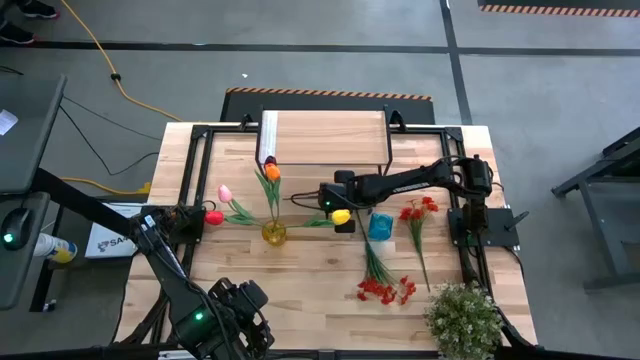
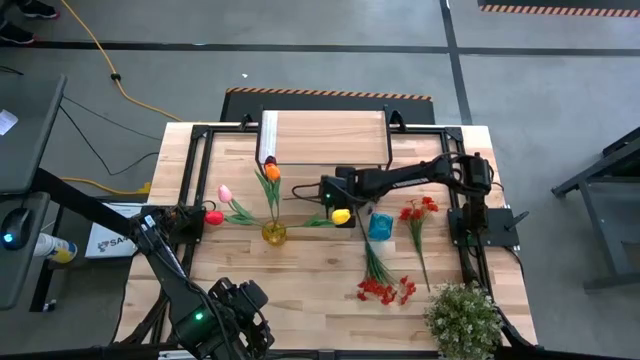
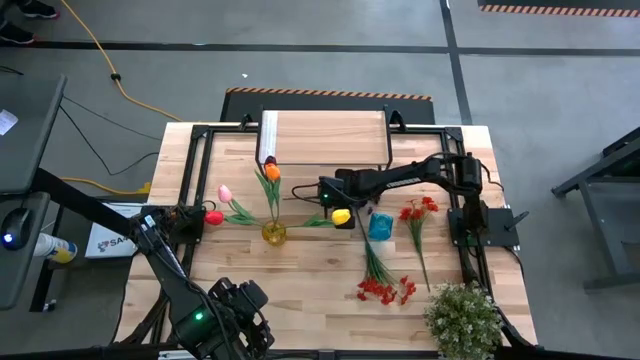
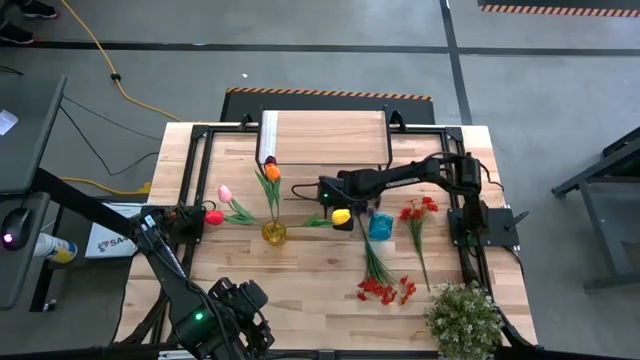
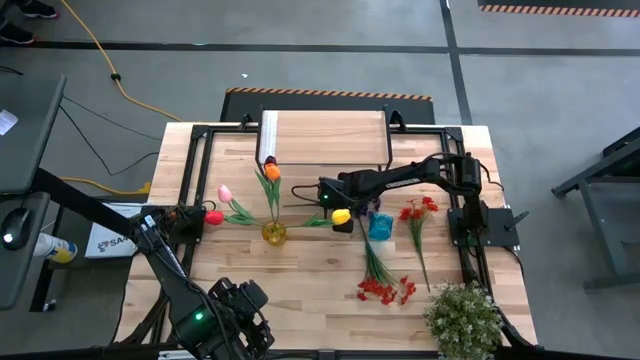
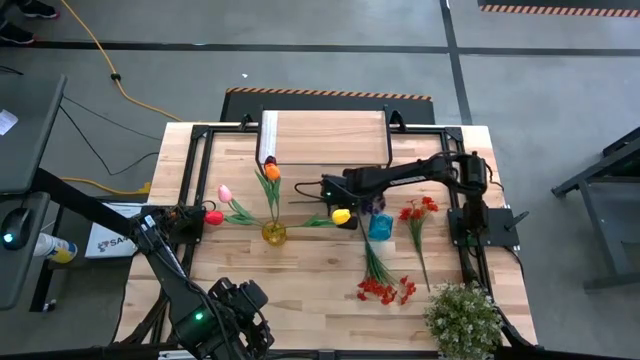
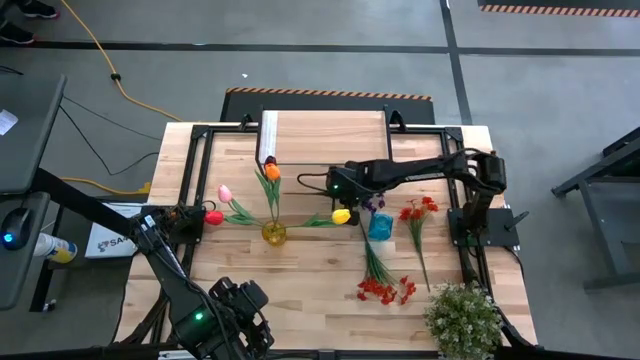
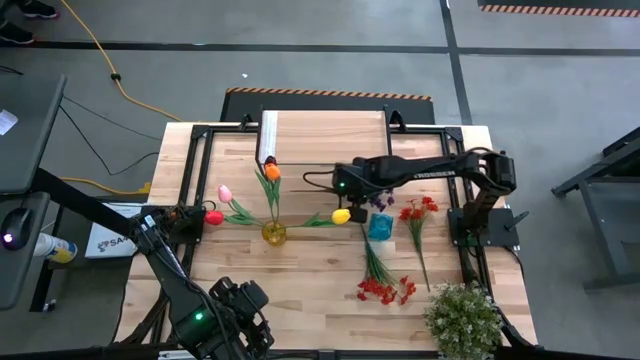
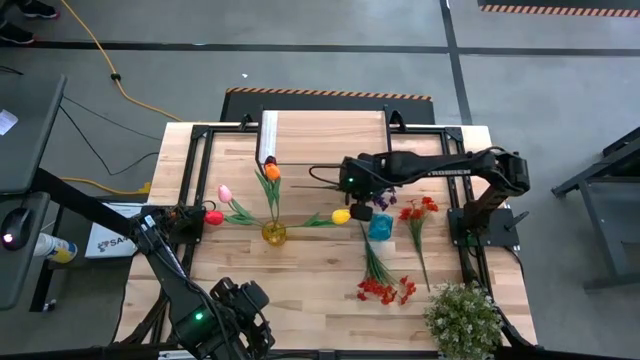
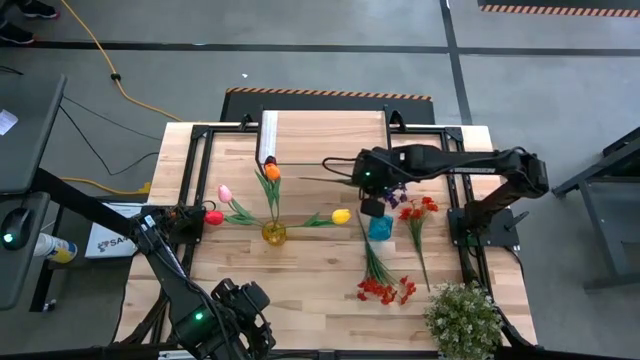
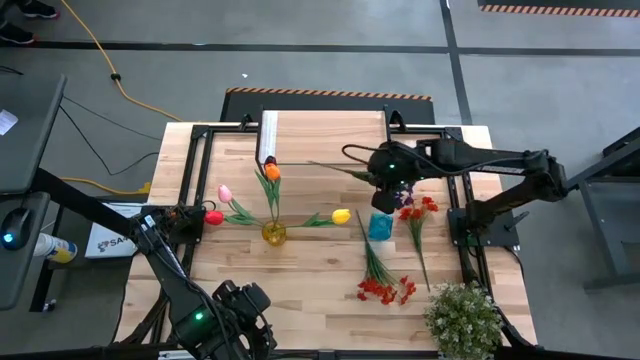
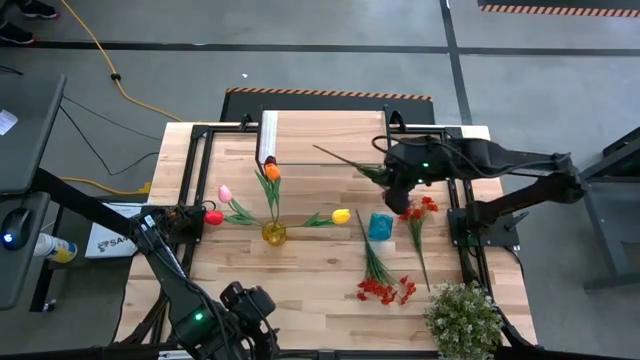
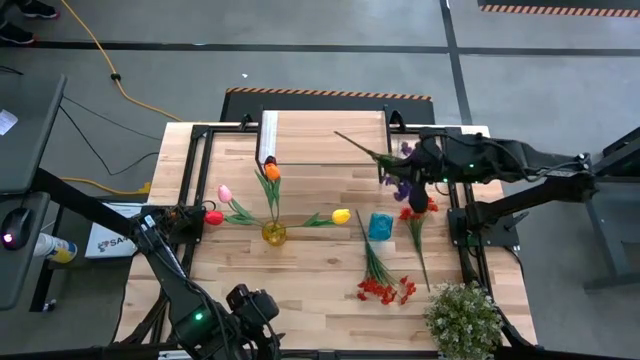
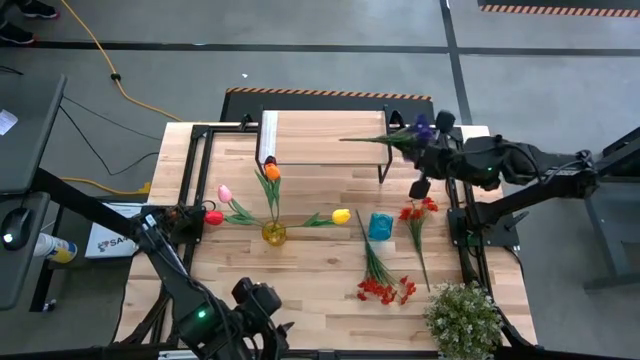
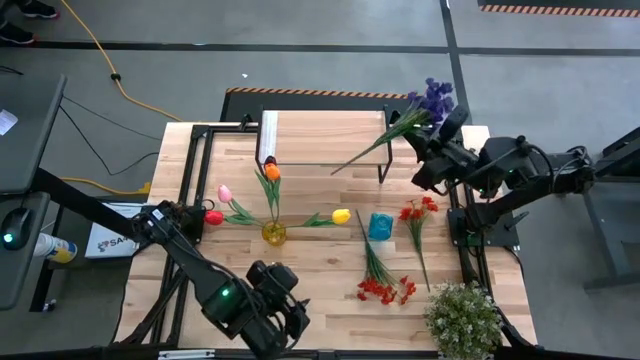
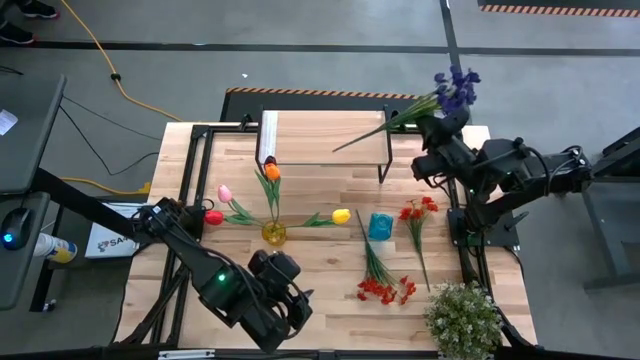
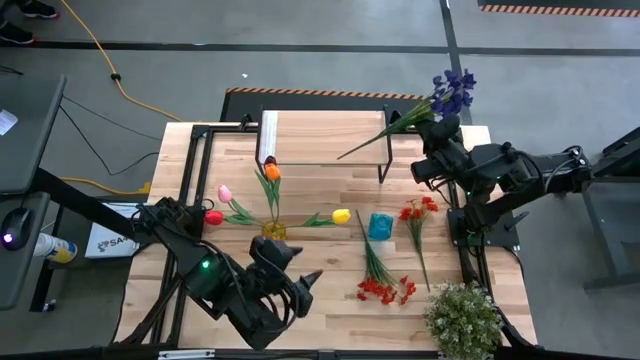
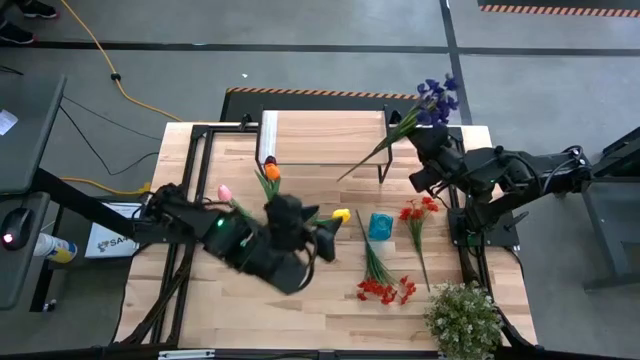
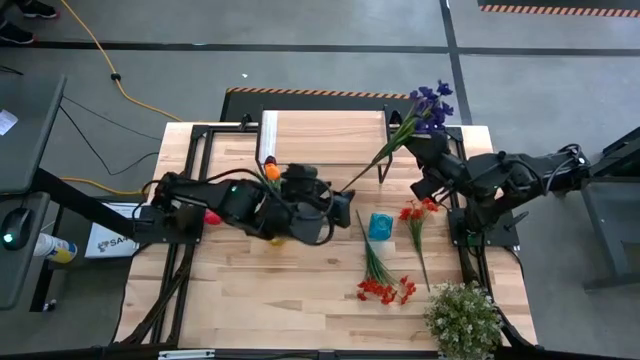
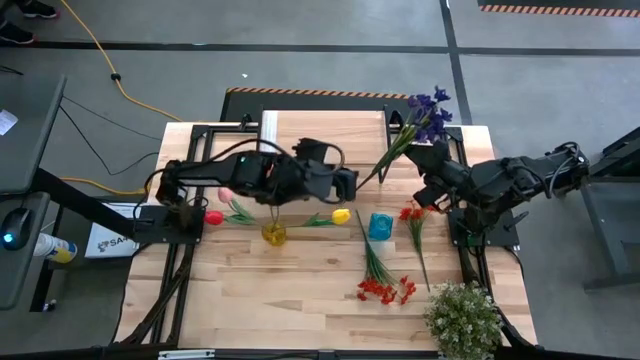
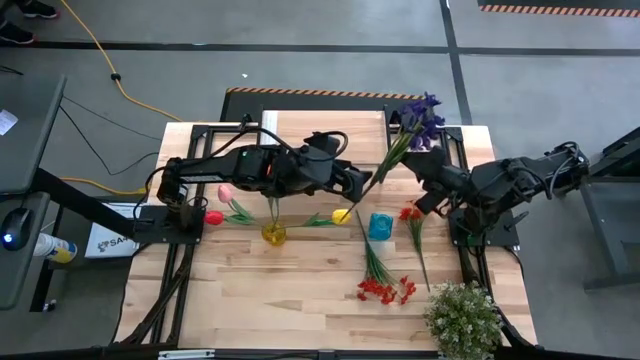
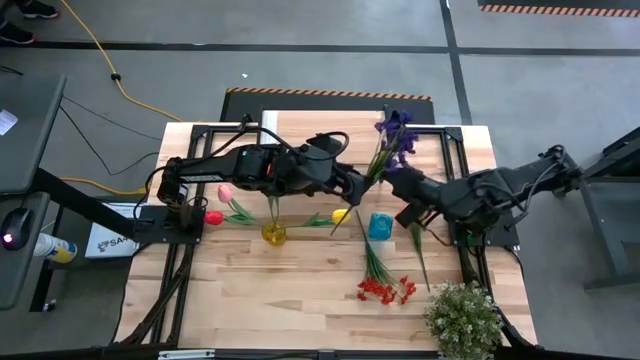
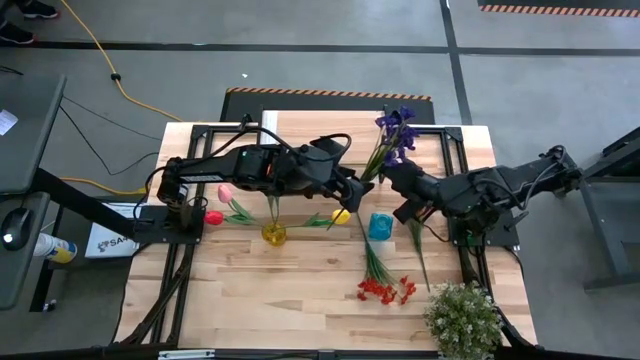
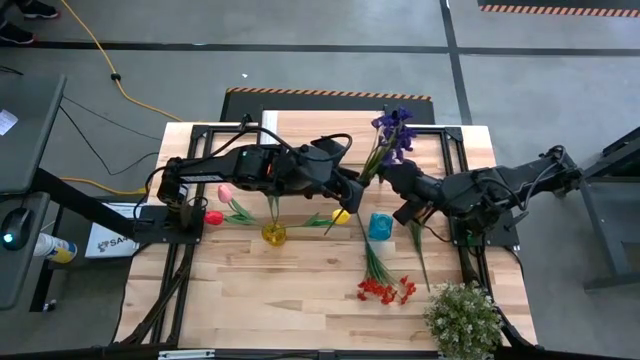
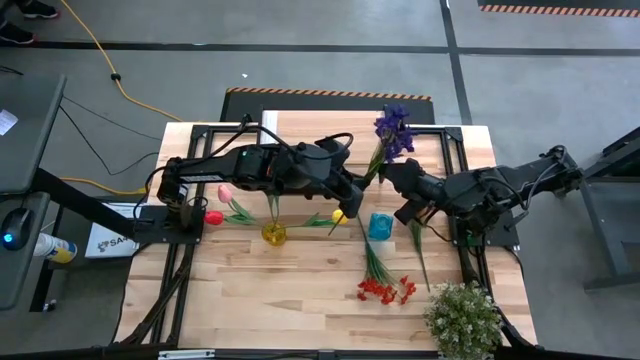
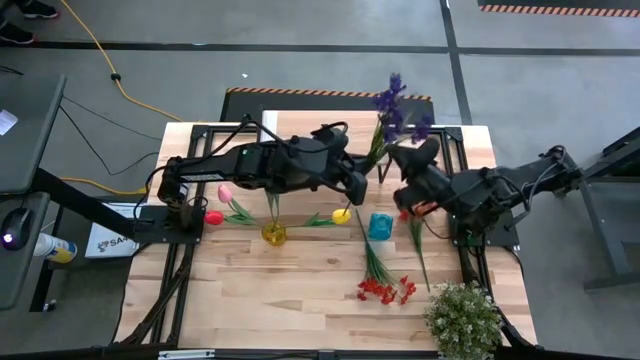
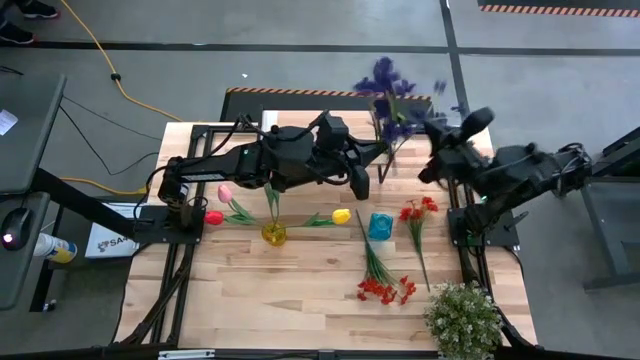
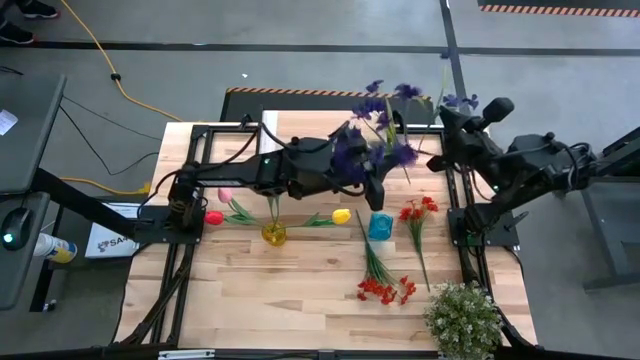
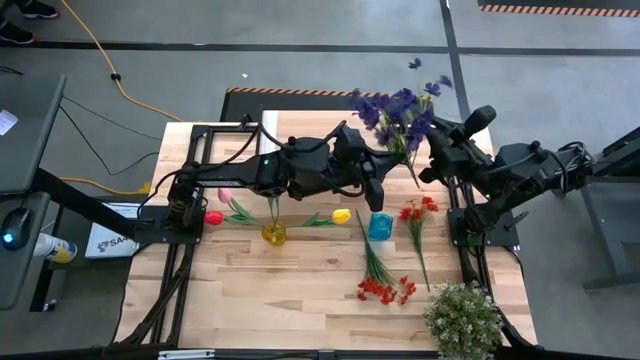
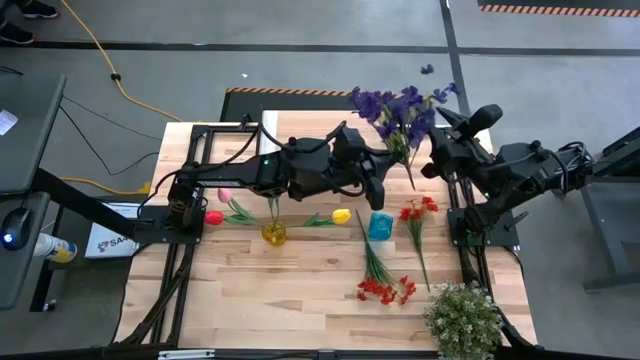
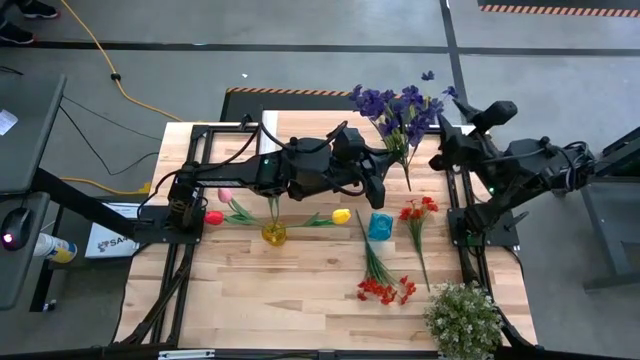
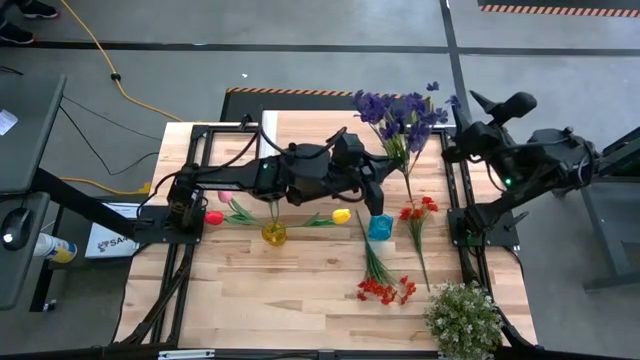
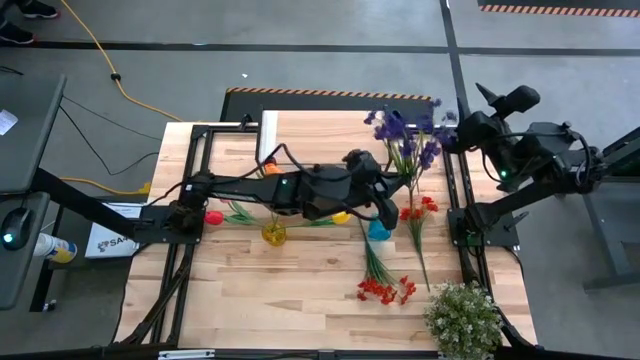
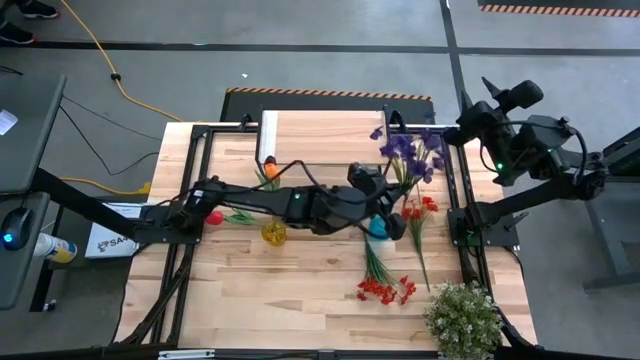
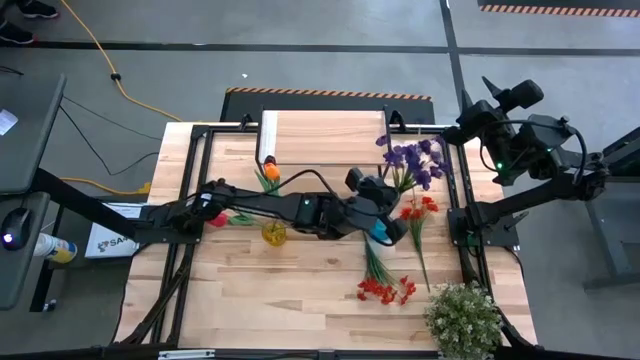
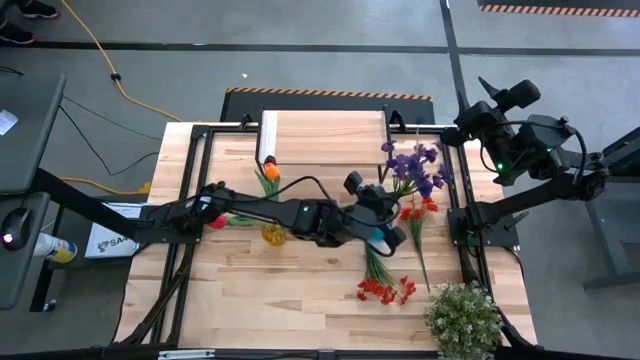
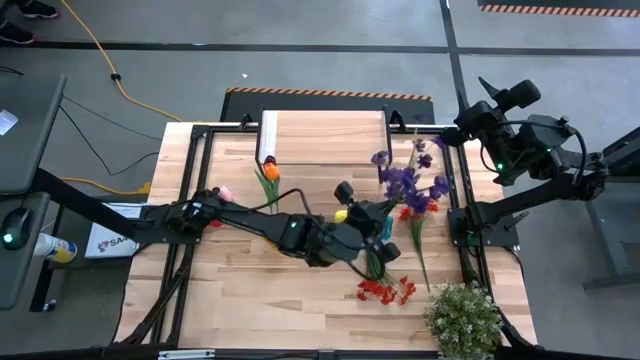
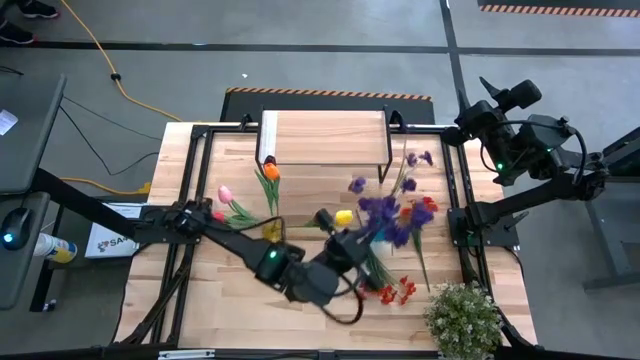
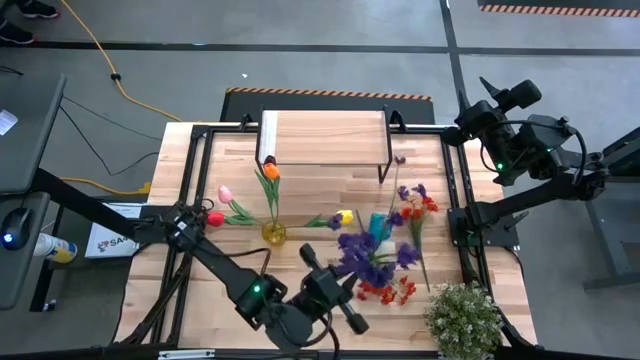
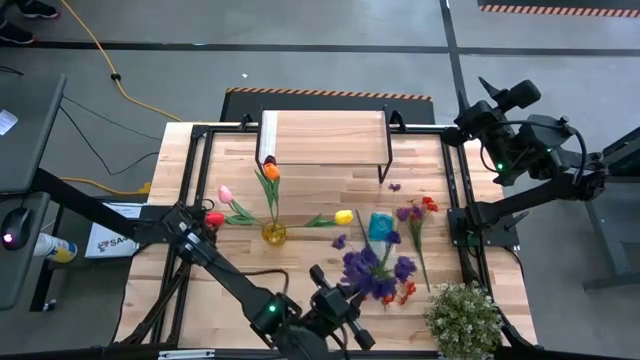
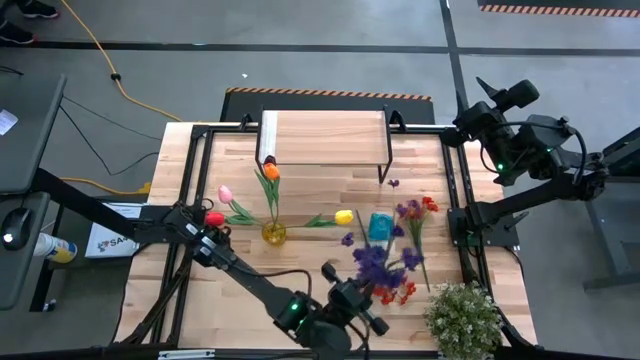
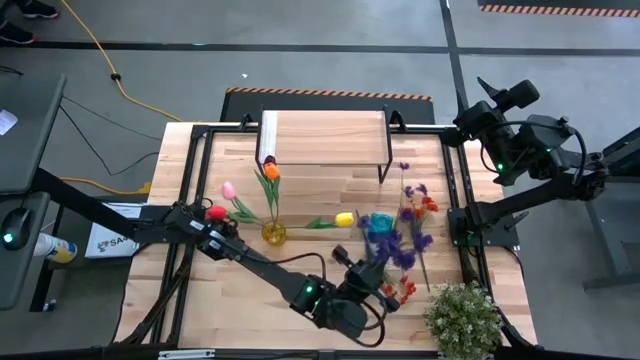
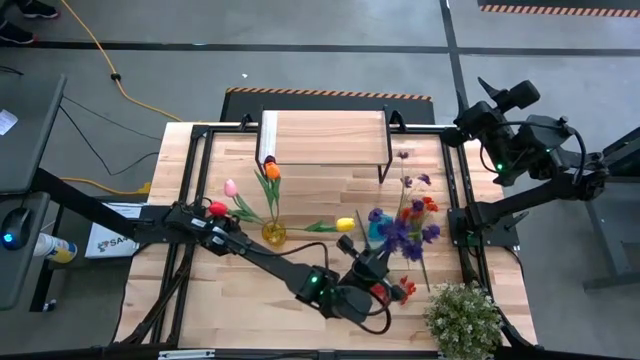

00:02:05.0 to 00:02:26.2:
Task: Pick and place flowers into a vace then onto a shelf
Put the purple flowers into the blue vase
